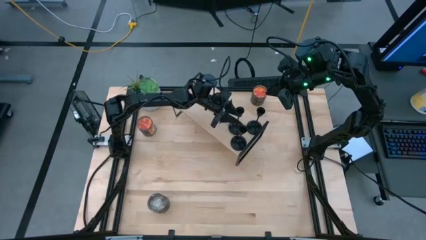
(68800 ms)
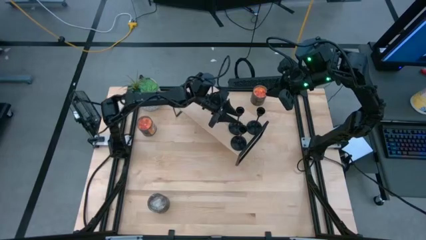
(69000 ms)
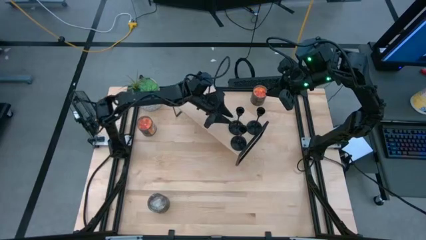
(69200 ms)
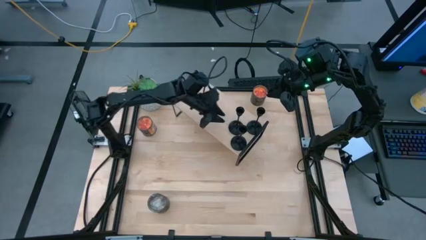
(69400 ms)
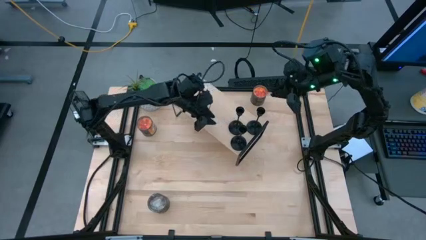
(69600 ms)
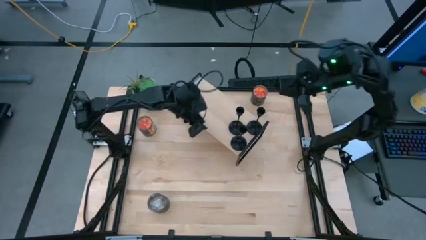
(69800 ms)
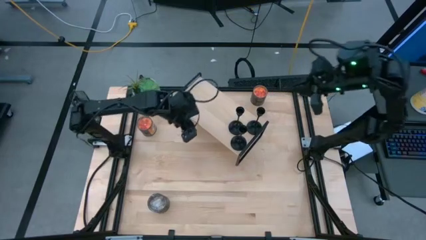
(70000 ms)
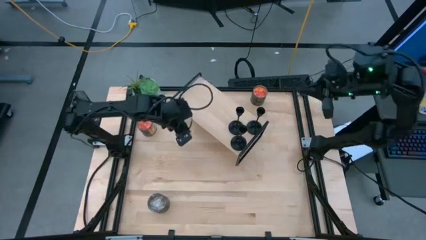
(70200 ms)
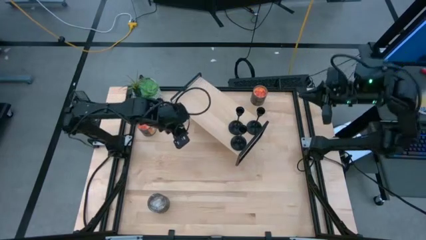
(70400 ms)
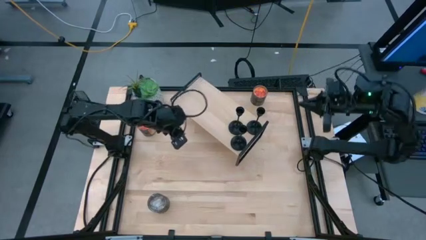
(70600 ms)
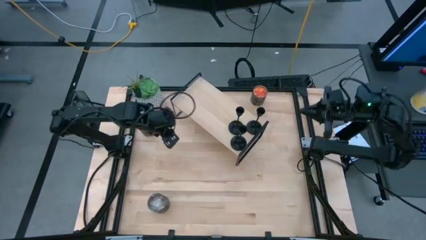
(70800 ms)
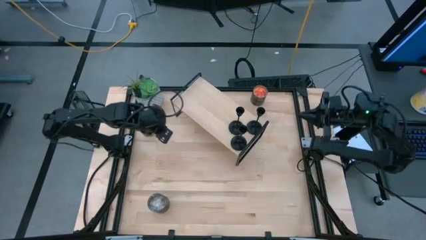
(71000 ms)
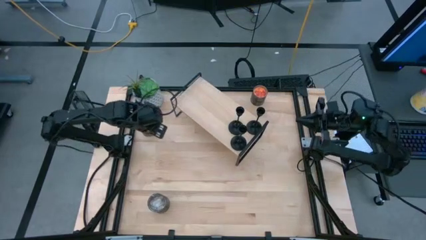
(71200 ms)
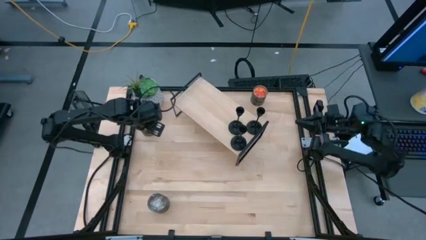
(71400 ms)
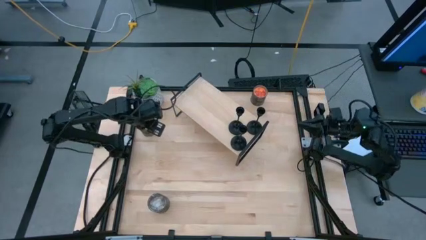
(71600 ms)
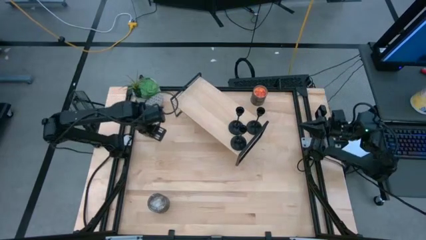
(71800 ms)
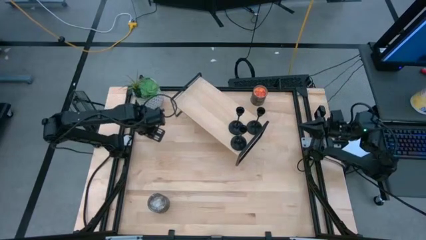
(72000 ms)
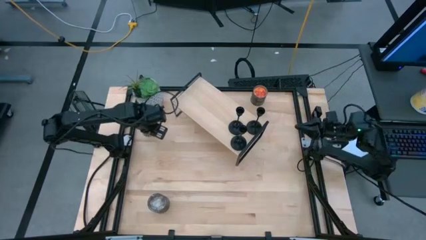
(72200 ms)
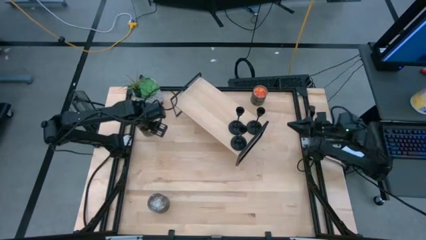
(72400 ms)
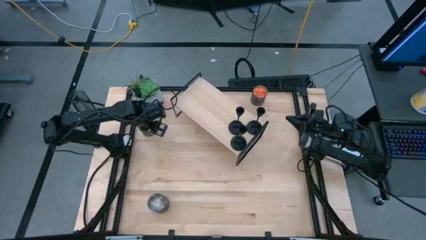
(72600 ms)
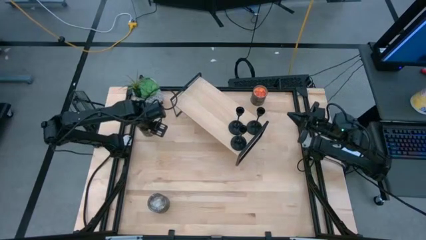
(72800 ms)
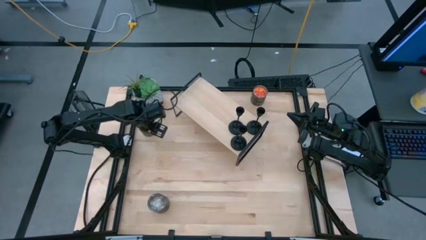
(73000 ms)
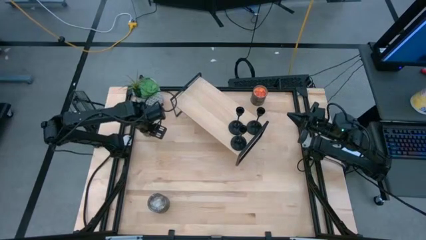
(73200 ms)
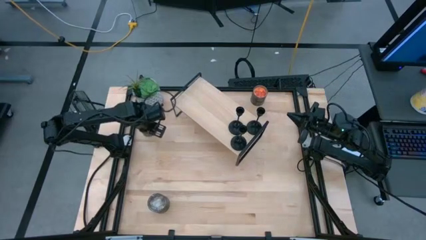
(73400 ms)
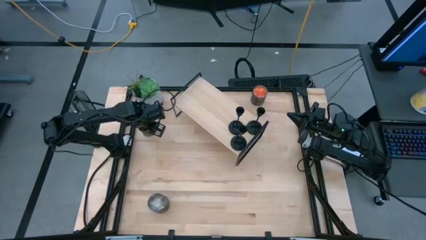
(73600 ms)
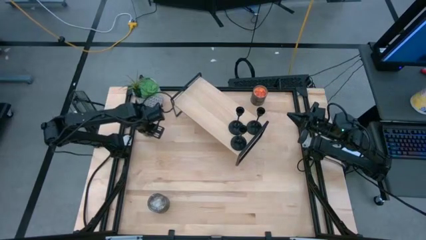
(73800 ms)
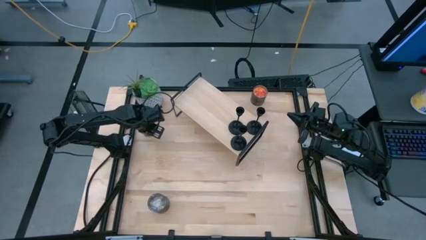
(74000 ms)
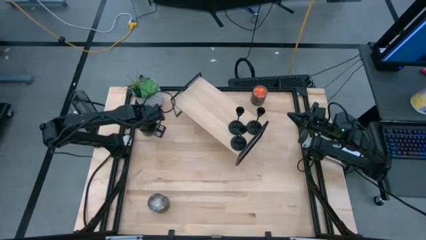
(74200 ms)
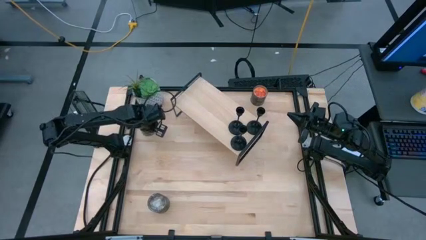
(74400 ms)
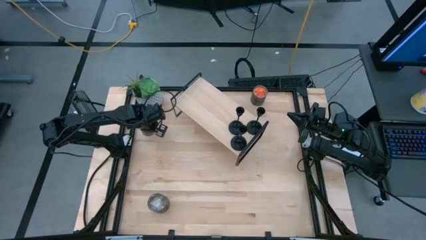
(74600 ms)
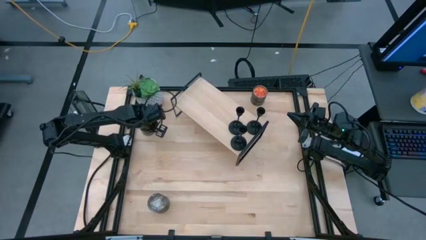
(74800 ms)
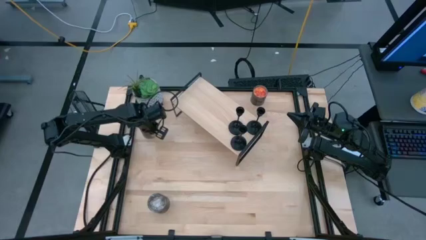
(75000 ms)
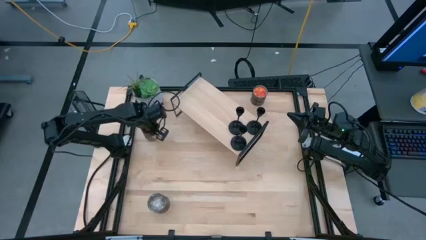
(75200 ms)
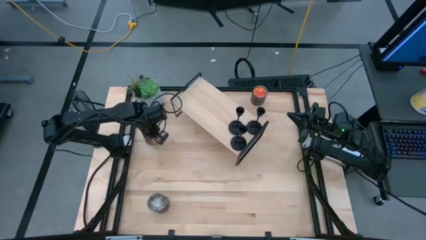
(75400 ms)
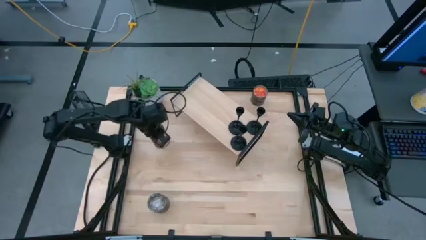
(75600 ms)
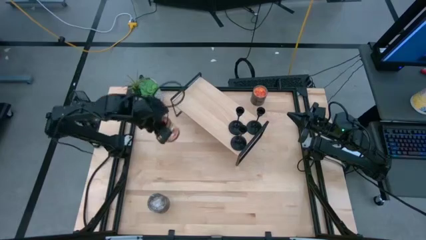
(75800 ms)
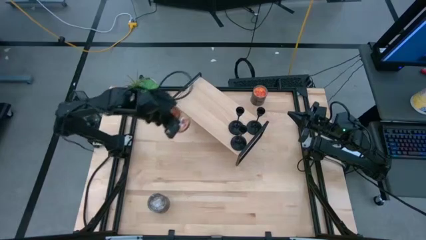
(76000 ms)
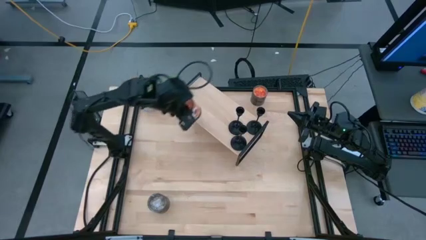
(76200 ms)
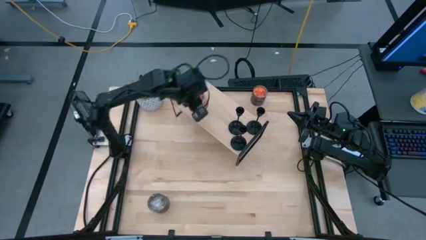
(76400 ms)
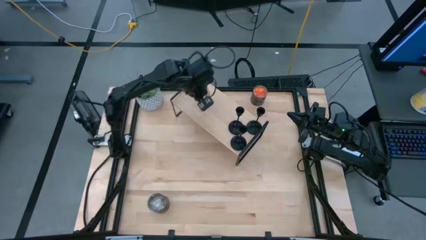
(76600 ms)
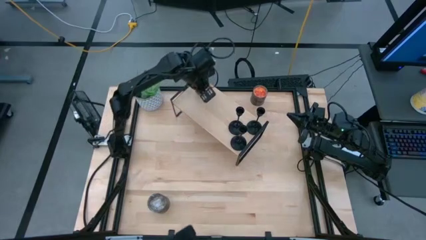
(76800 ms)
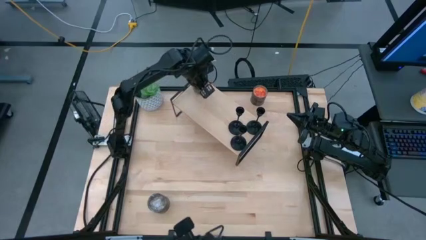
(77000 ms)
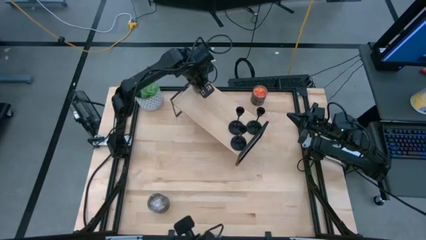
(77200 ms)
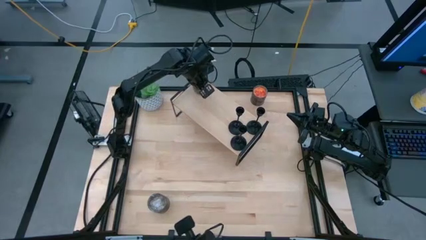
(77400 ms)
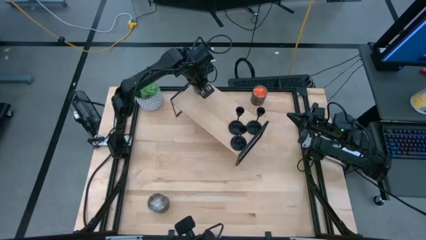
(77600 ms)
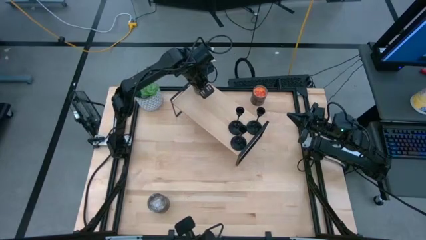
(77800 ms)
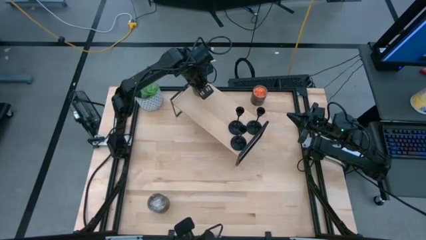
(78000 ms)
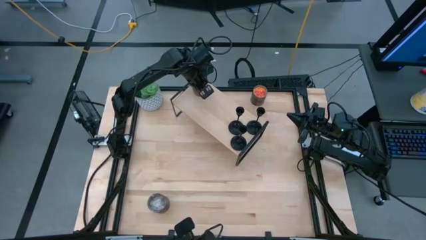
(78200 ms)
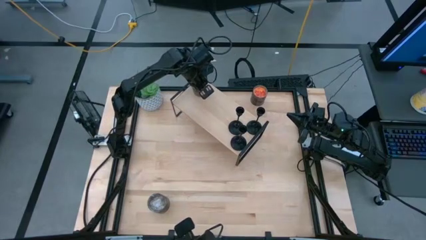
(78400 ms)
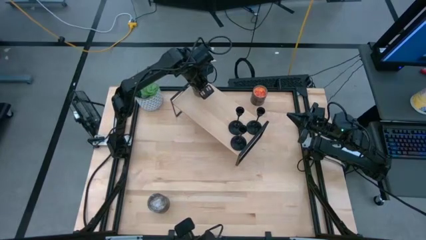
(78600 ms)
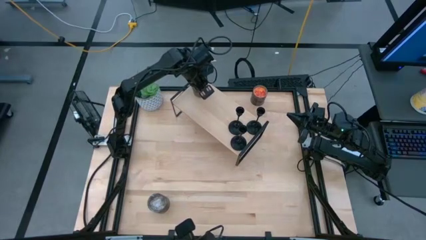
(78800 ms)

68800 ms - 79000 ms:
Task: Pick & Place candle stick holders
Put the left orange scented candle on the shelf

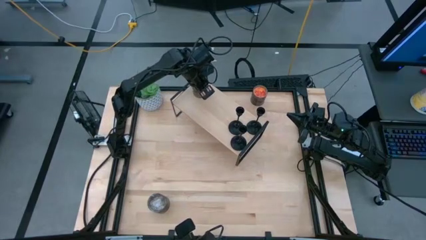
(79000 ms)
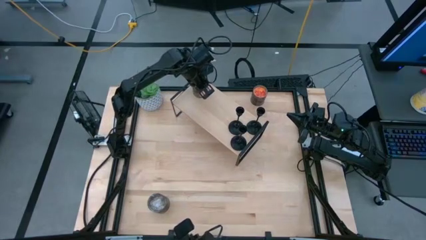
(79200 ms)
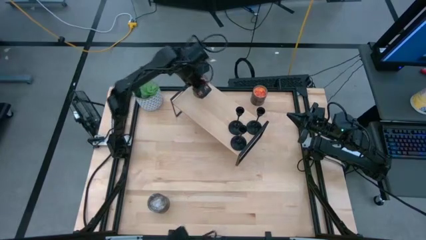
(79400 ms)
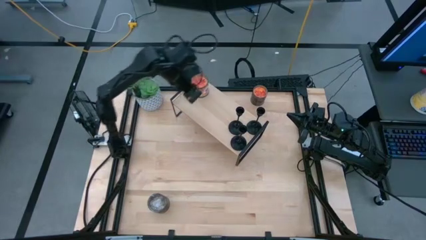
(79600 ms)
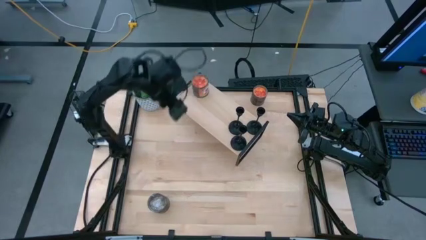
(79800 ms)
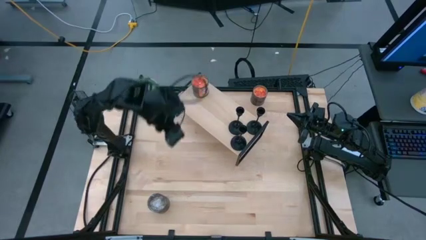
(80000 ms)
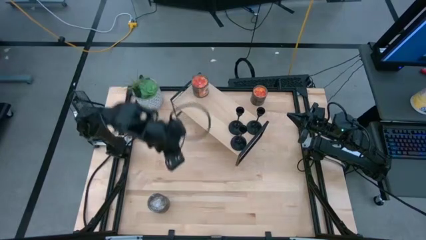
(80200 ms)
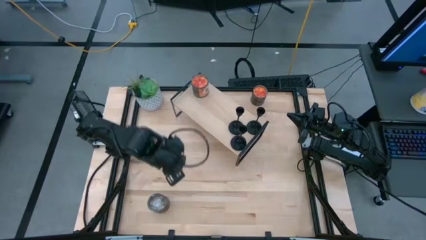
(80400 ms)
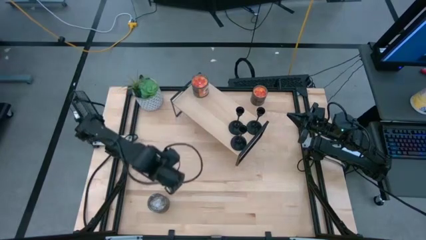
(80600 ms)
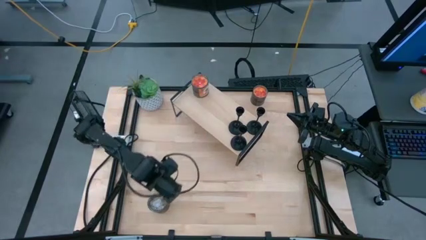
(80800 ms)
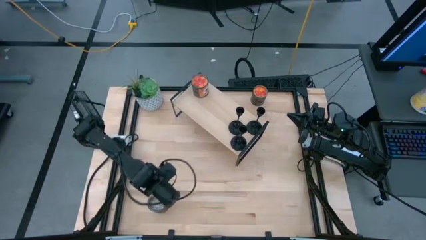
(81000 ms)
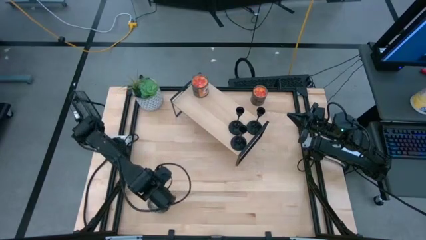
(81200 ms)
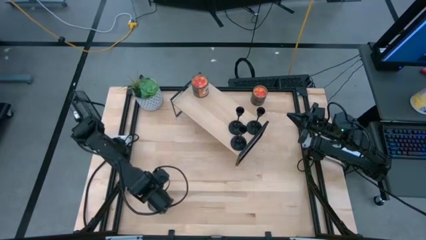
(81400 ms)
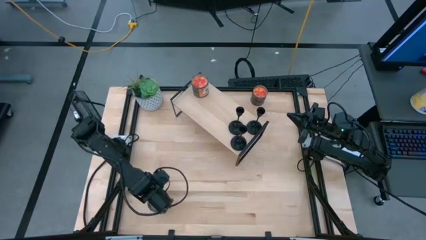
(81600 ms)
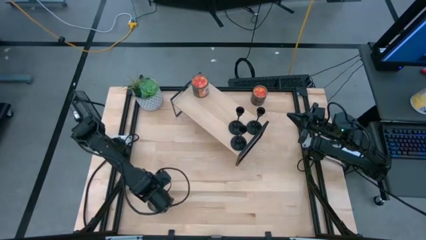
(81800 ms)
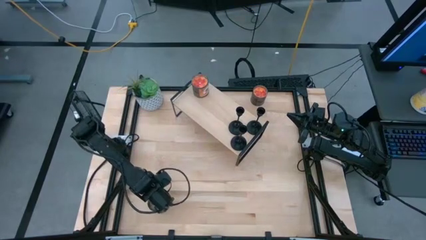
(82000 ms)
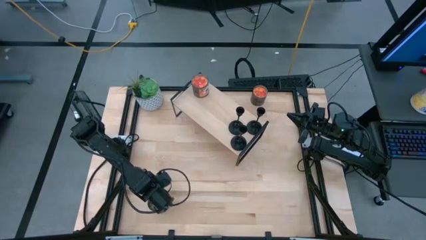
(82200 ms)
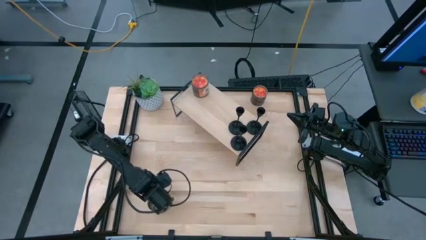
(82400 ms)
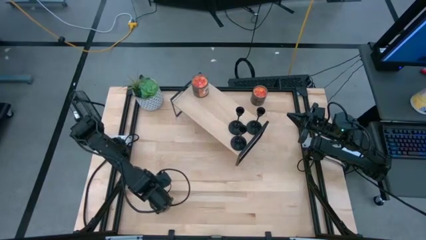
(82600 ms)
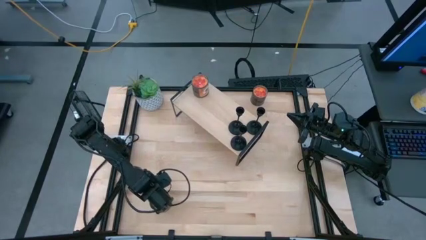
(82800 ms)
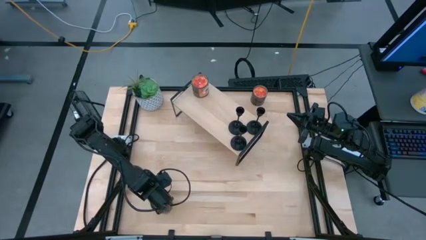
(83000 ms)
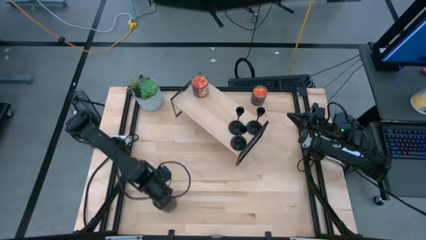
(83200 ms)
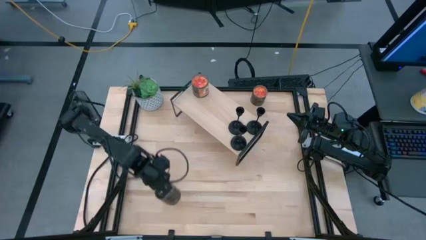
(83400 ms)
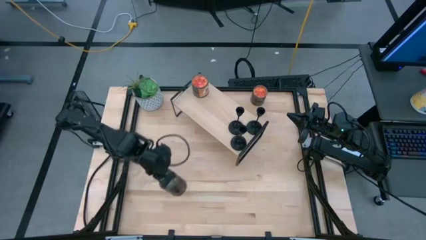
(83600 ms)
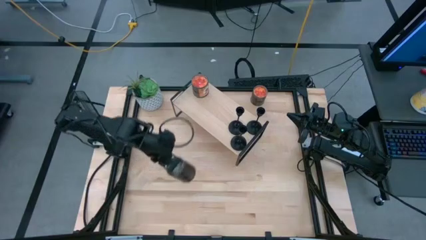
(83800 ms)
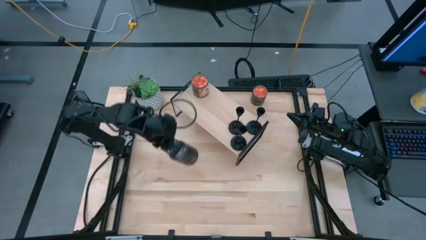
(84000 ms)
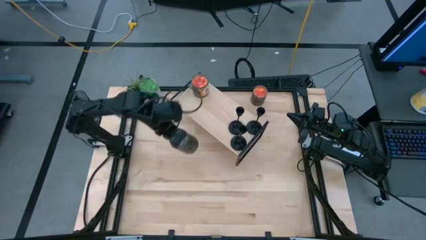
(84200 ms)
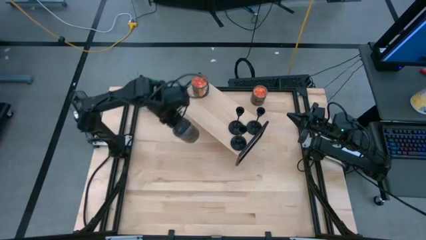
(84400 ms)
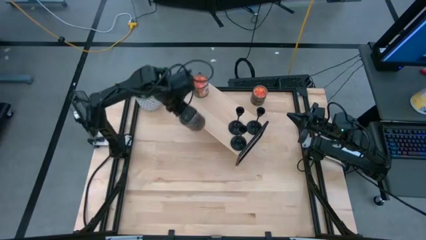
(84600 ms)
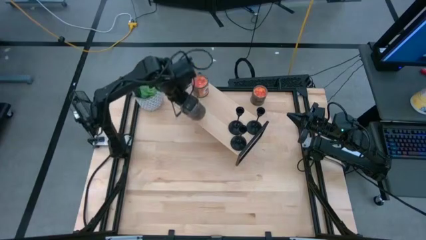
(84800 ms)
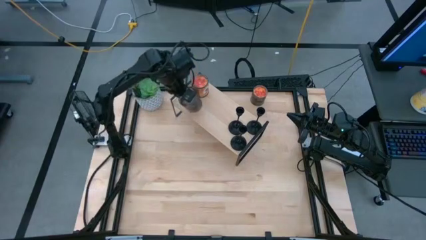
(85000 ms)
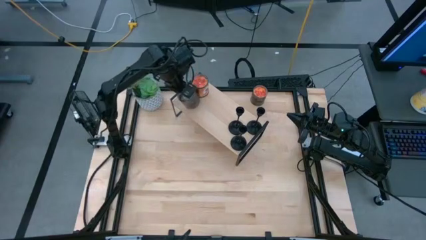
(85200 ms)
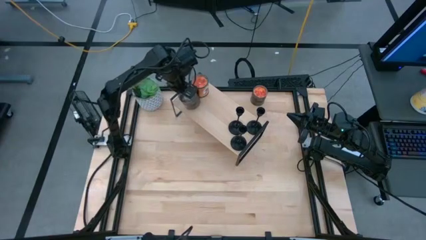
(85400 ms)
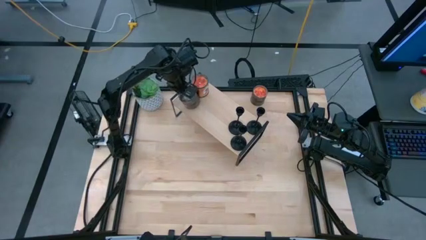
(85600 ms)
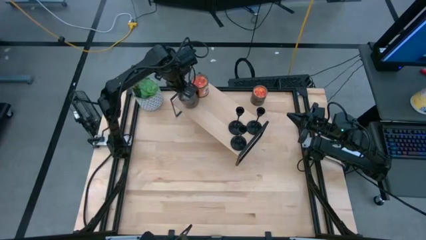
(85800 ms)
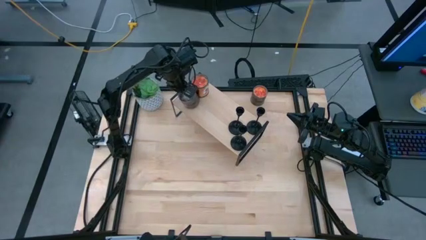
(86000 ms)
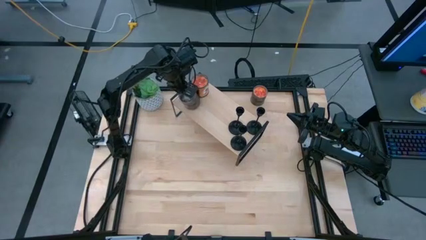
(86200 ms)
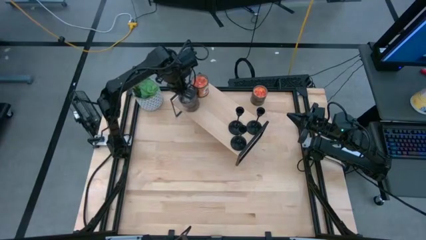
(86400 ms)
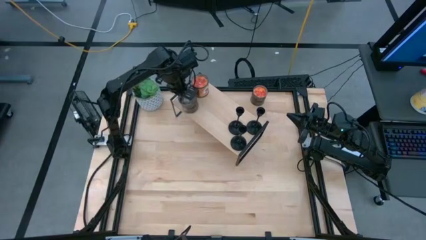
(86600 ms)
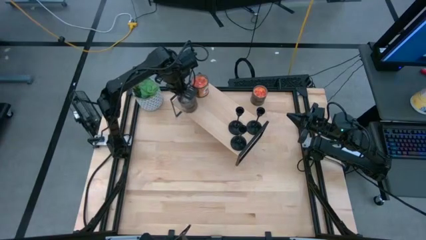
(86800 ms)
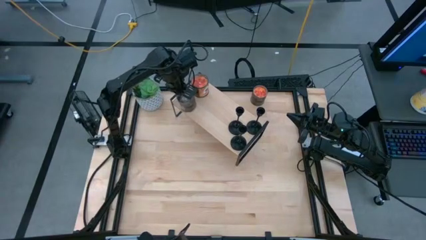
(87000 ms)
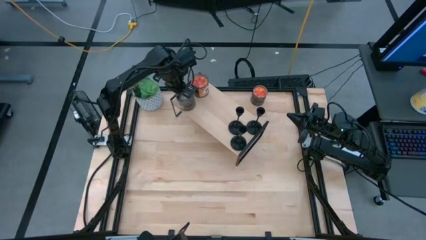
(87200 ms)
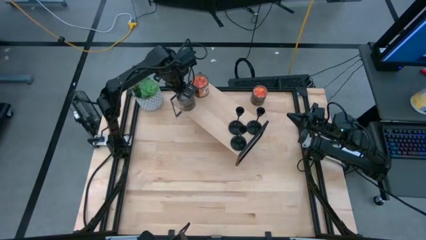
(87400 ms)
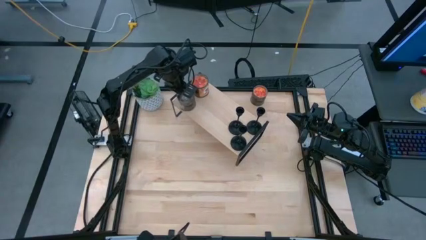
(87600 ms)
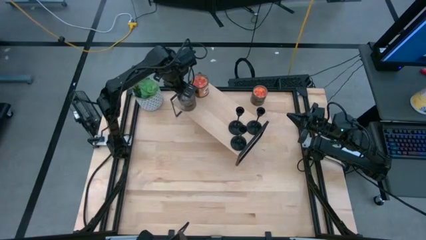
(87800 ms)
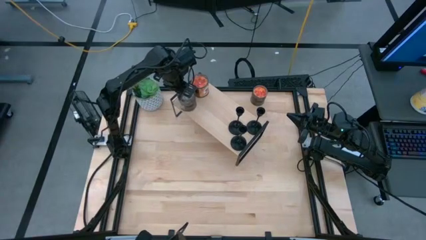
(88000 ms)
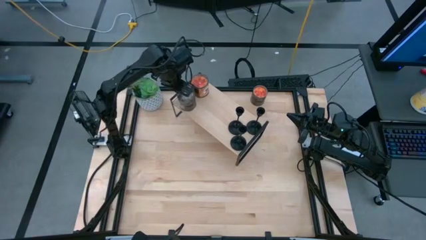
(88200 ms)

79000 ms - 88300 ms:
Put the brown scented candle on the shelf
